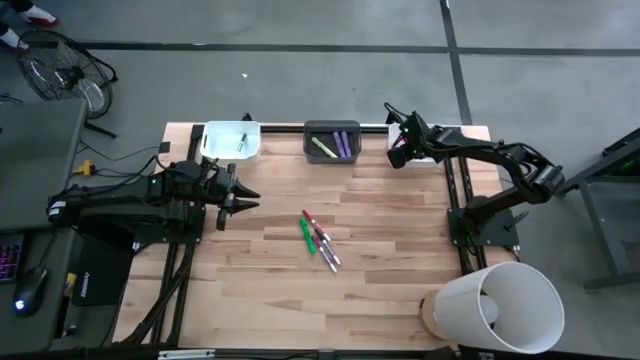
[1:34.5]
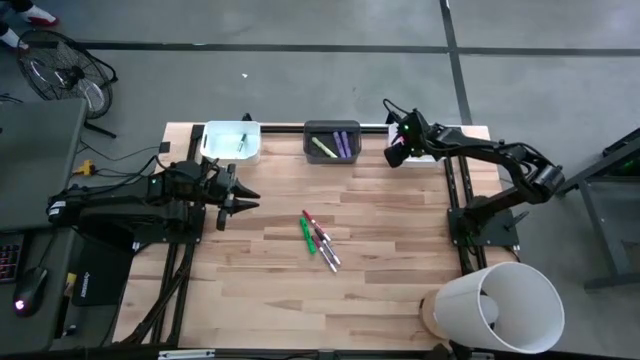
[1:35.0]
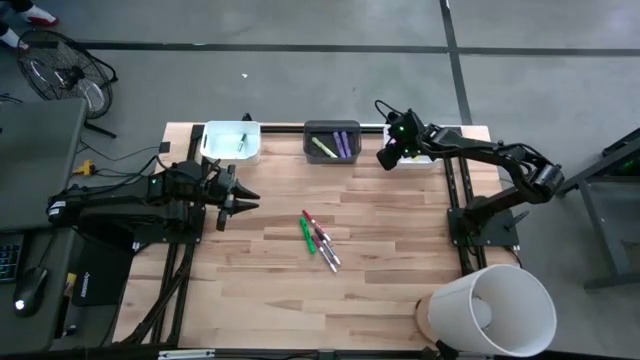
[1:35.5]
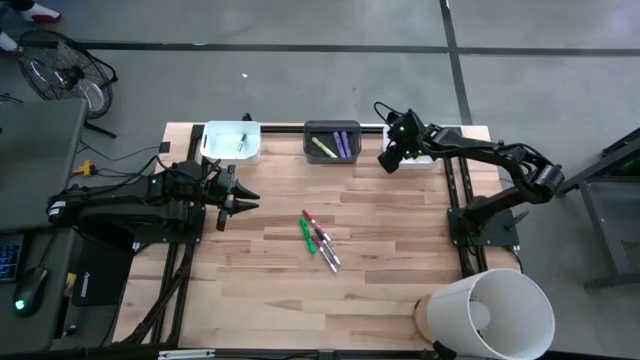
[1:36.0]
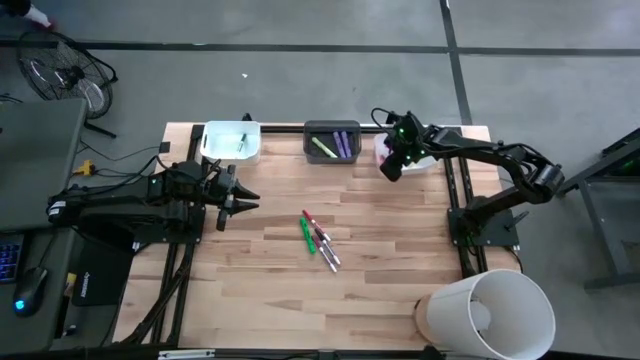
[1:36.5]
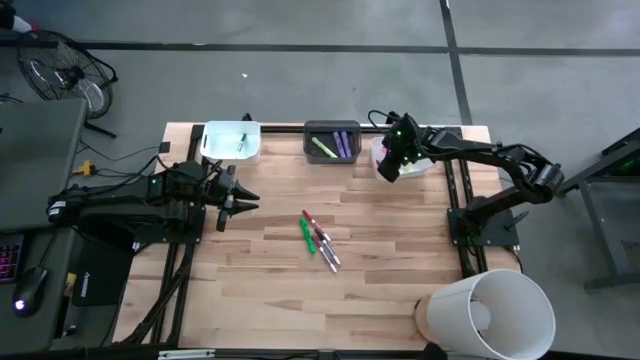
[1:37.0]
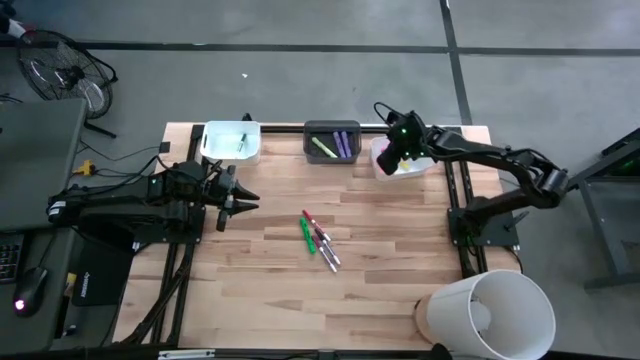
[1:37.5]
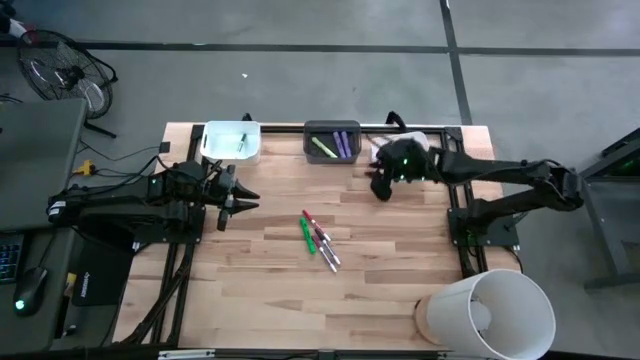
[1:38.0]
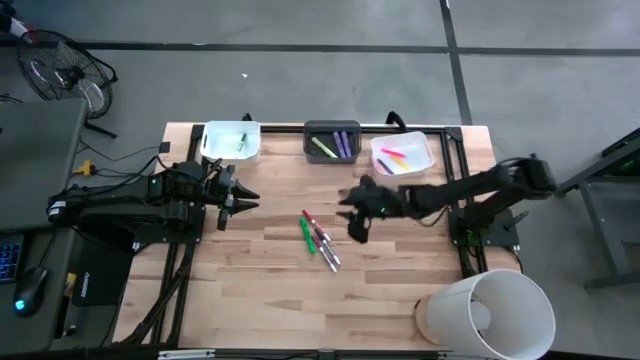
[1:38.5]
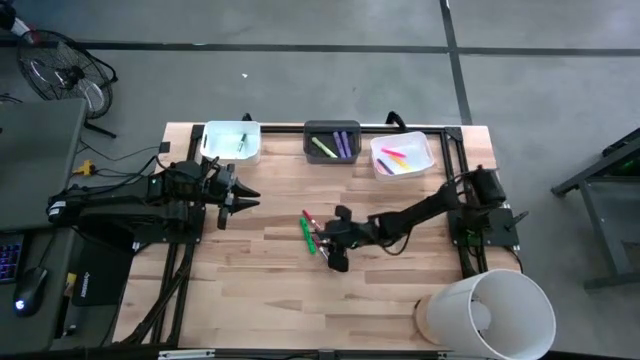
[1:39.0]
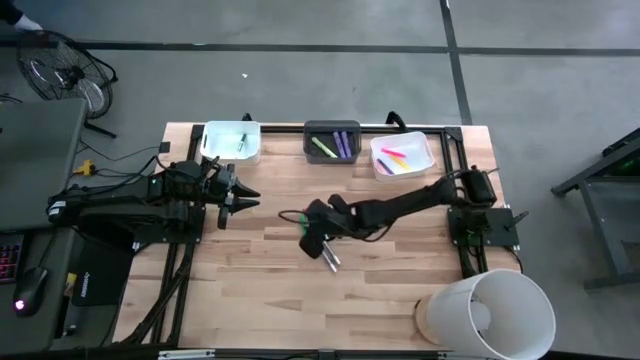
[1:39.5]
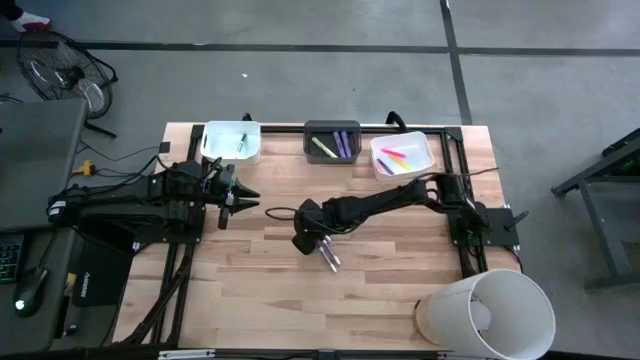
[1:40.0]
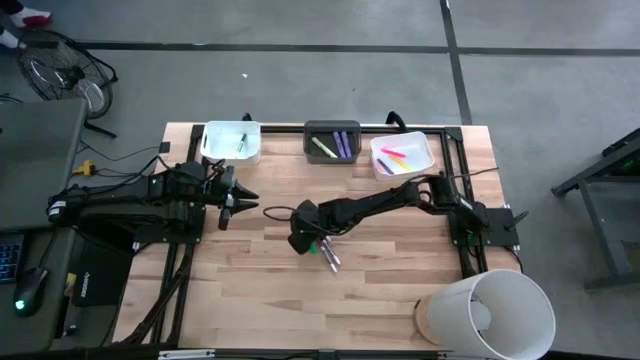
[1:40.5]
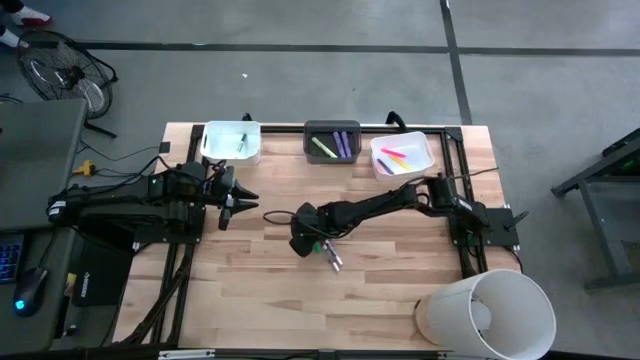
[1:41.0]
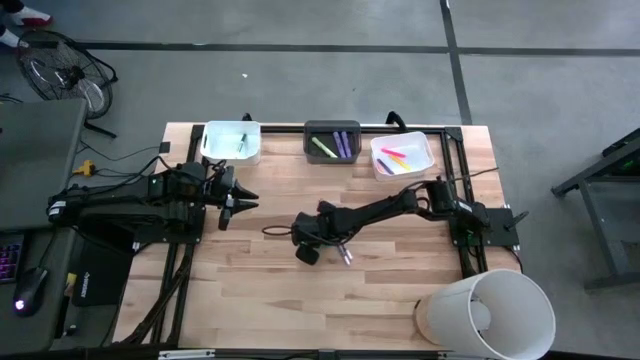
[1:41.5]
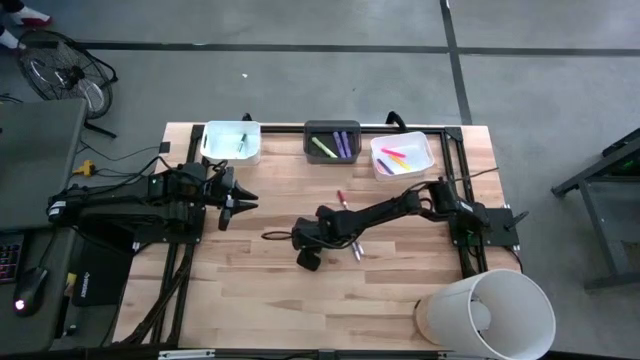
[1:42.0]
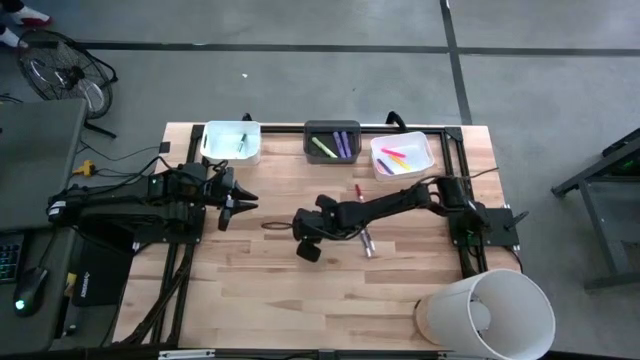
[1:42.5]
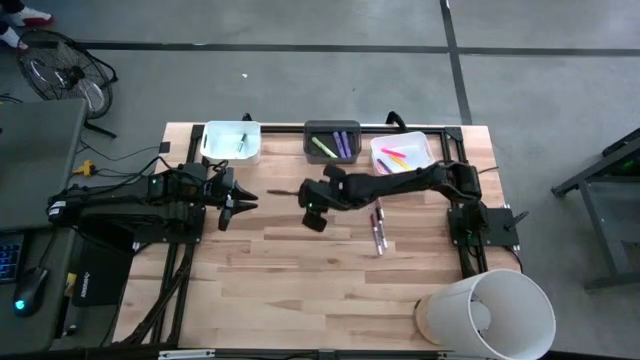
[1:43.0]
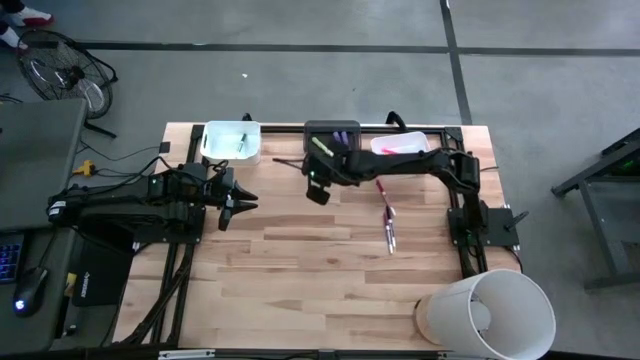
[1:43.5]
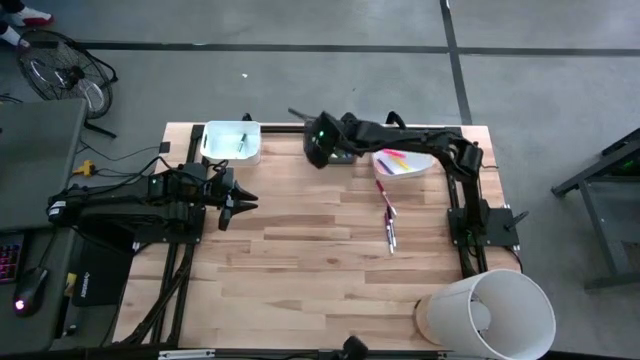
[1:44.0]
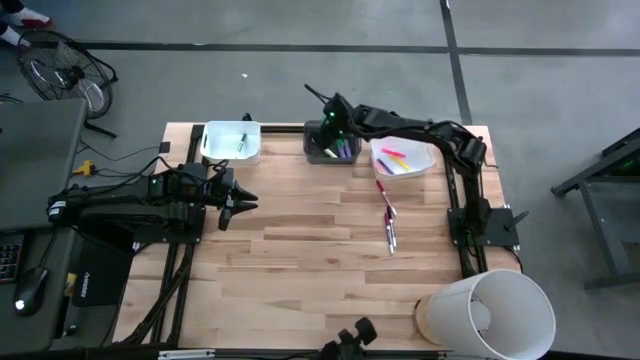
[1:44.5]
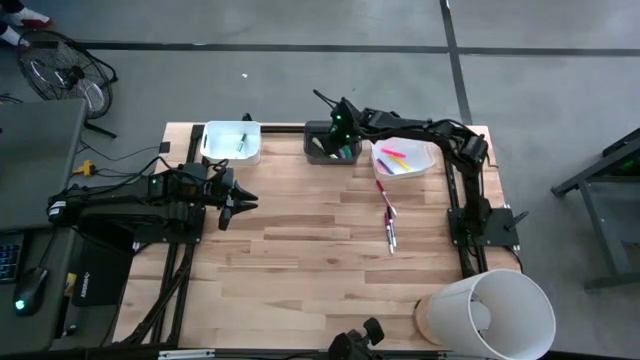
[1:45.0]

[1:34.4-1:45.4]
Task: Pick & Place Markers
Put the green marker pen into the black bin

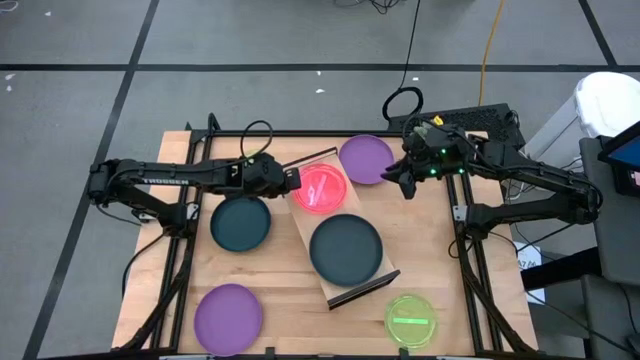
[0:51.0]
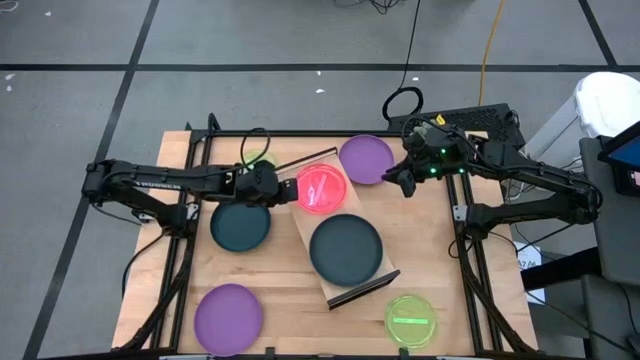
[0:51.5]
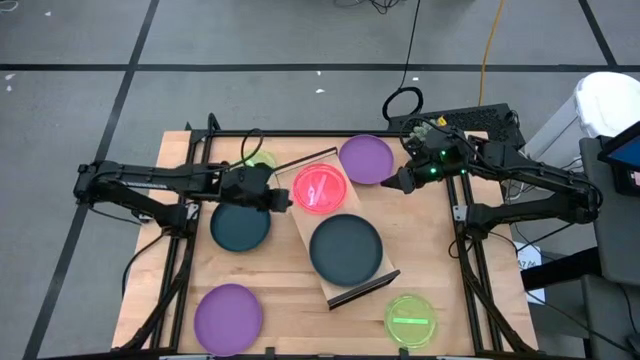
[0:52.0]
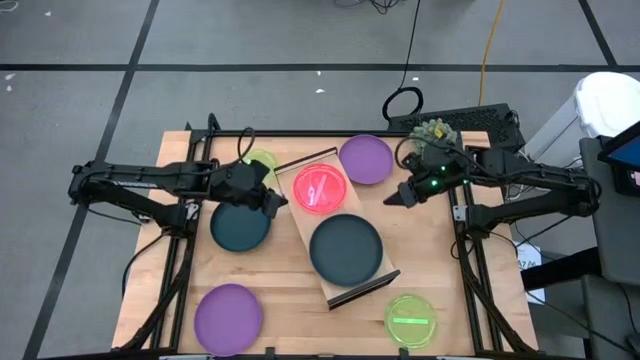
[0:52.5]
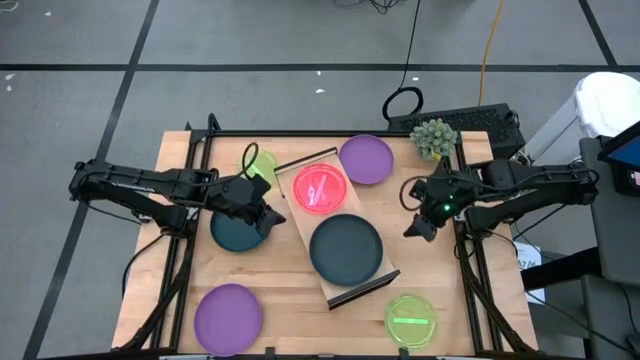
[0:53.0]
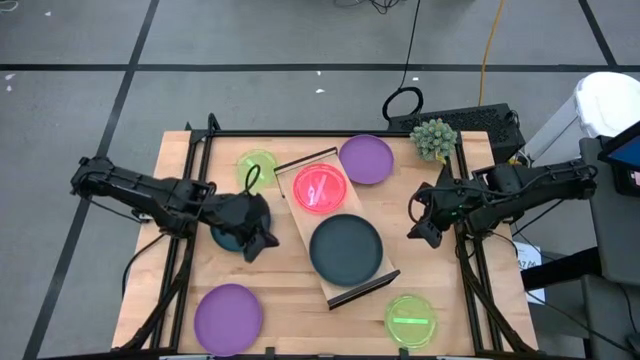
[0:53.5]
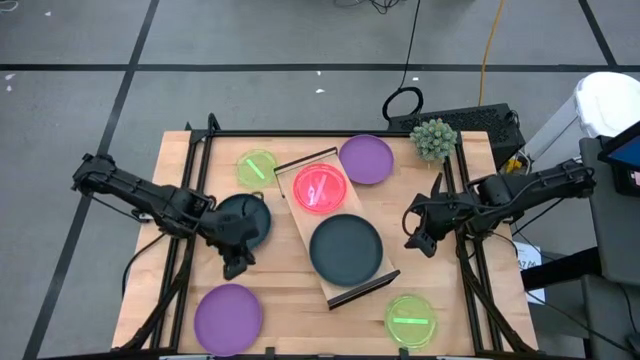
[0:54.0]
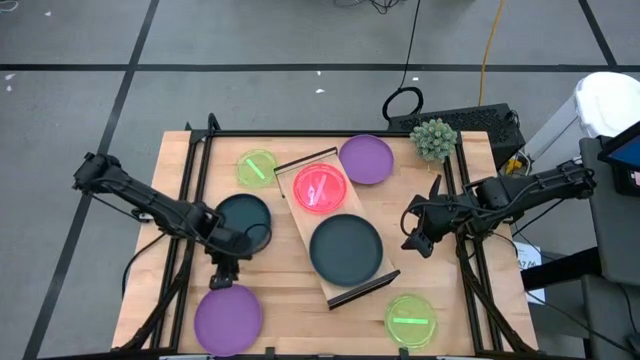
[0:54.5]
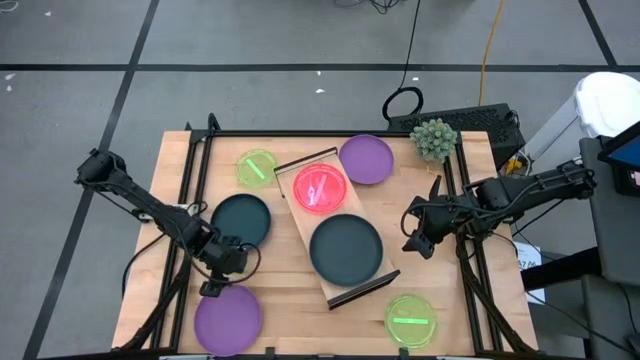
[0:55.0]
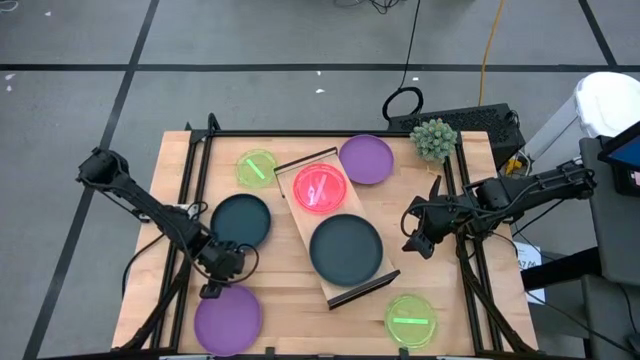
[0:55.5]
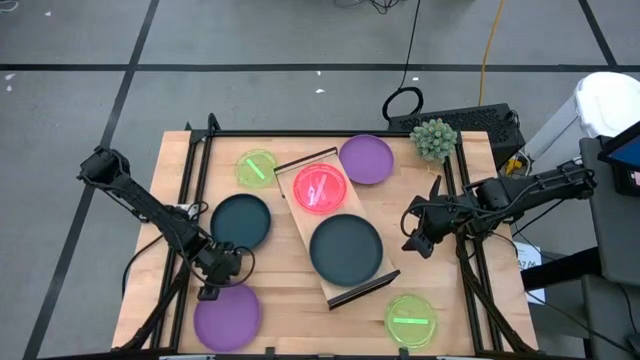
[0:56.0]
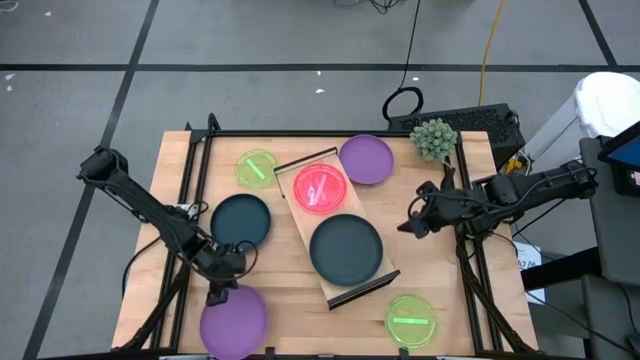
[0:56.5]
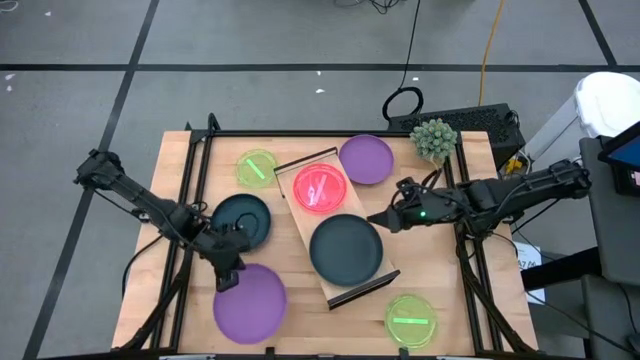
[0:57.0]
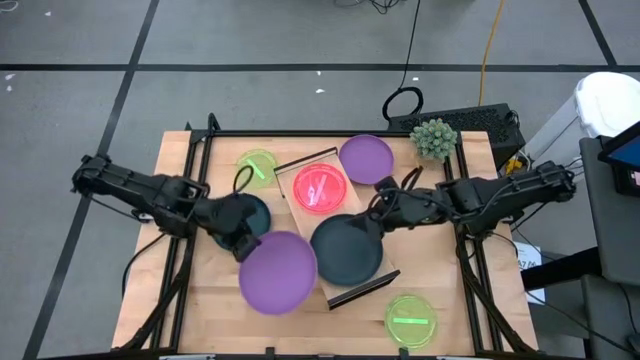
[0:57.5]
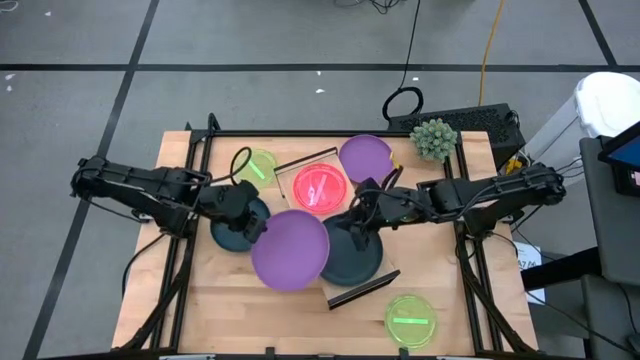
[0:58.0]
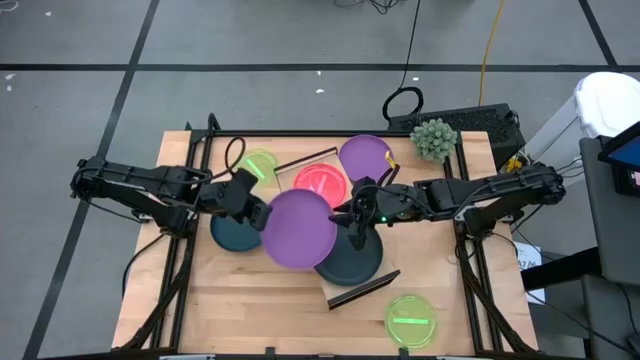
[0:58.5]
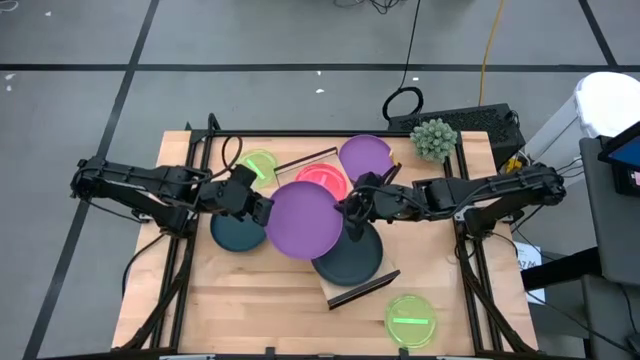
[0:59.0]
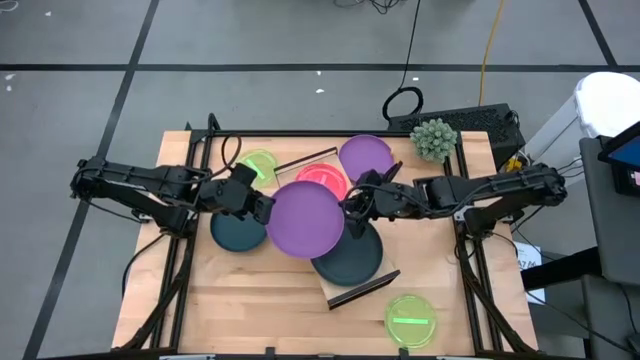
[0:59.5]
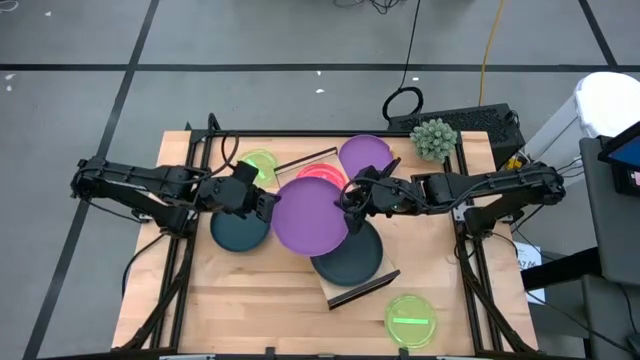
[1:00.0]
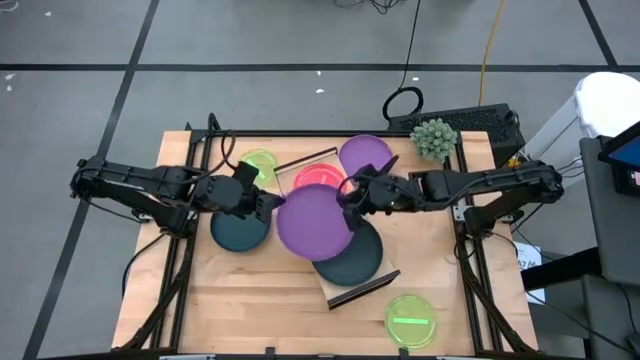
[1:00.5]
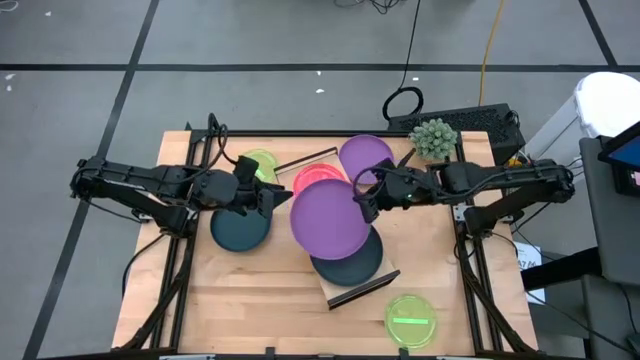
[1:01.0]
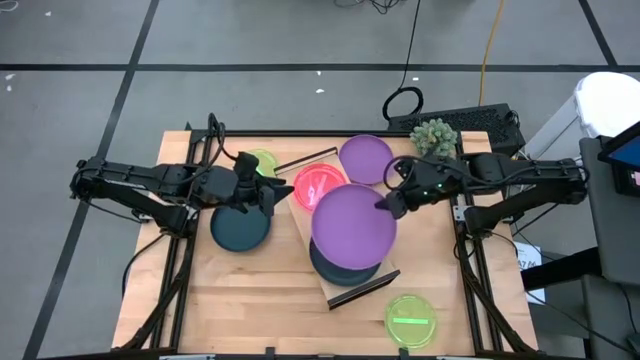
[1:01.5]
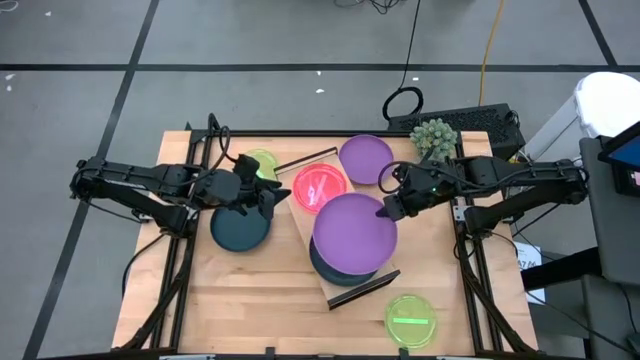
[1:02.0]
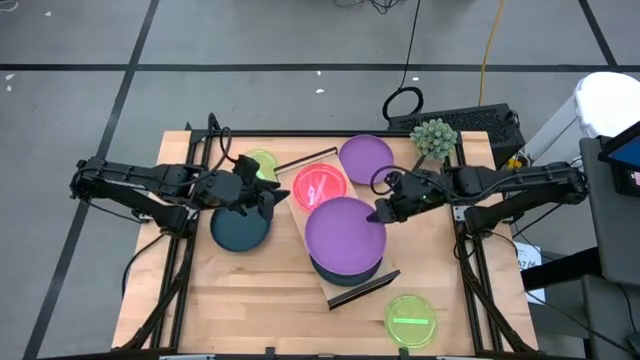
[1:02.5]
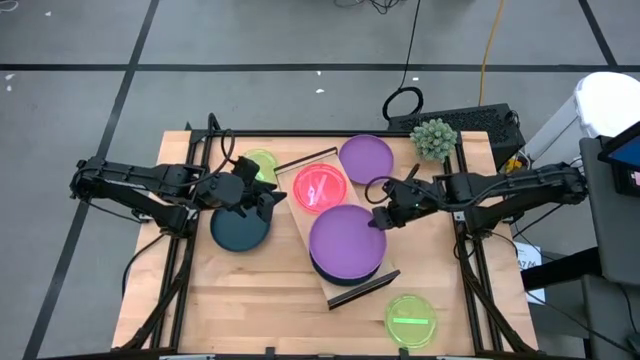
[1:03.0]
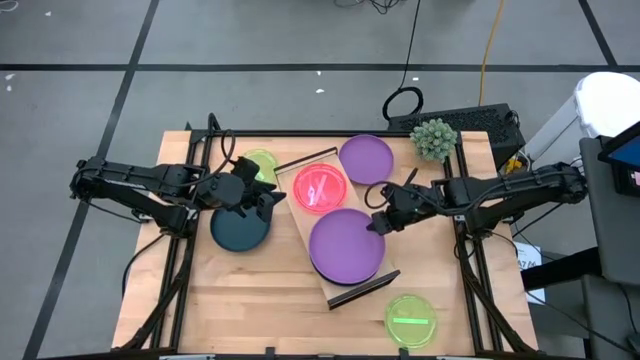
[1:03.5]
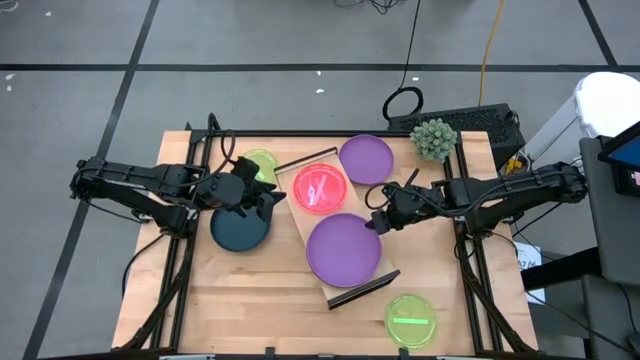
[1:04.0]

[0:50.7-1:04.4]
Task: Place and stack plates onto a shelf
Stack the bottom purple plate on top of the black plate on the shelf
